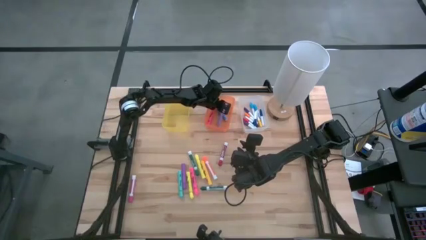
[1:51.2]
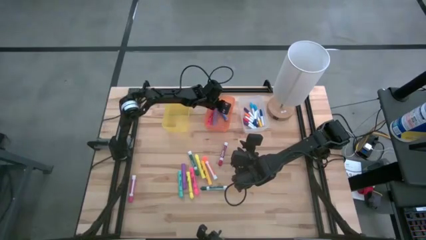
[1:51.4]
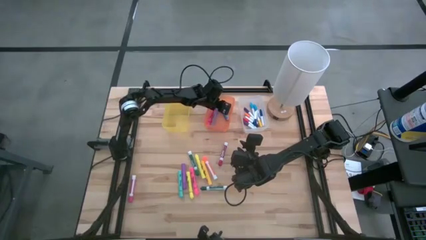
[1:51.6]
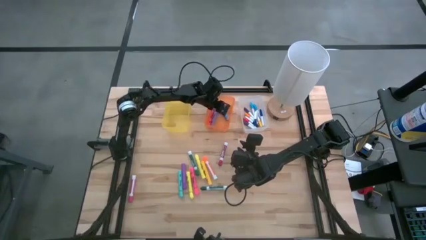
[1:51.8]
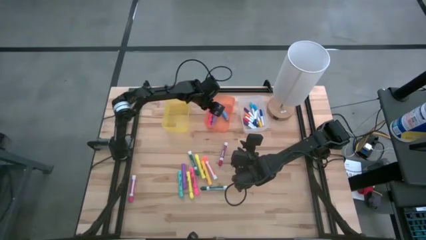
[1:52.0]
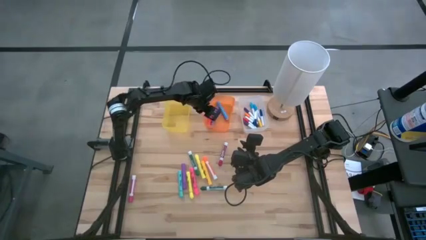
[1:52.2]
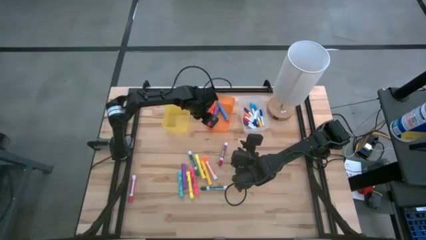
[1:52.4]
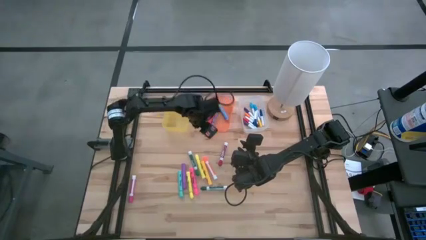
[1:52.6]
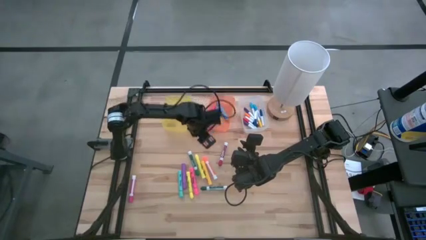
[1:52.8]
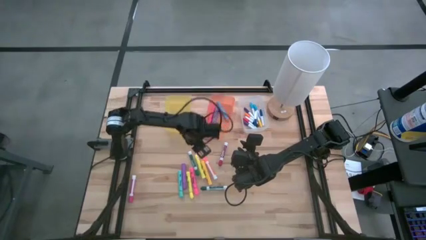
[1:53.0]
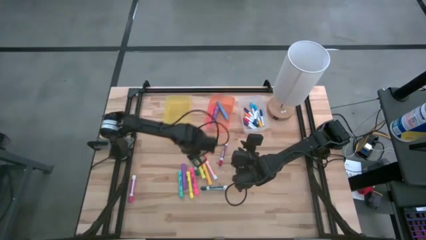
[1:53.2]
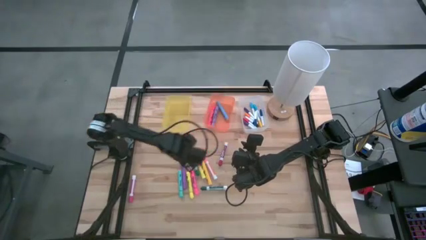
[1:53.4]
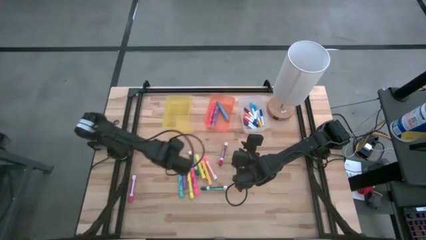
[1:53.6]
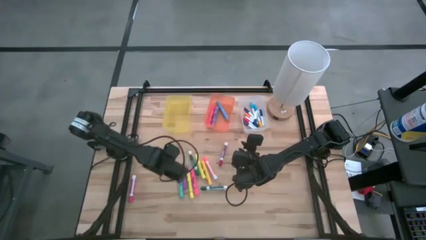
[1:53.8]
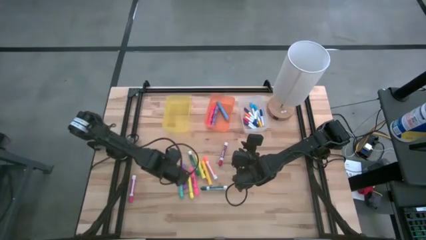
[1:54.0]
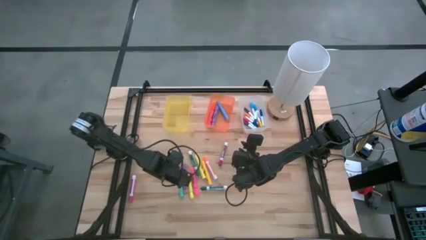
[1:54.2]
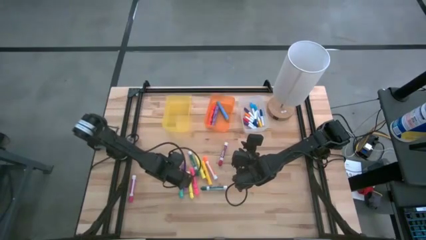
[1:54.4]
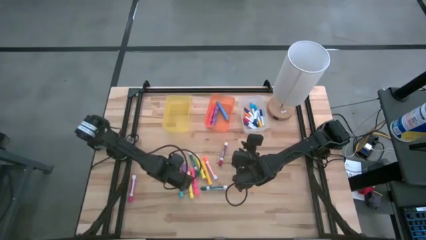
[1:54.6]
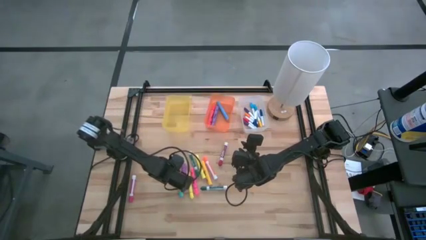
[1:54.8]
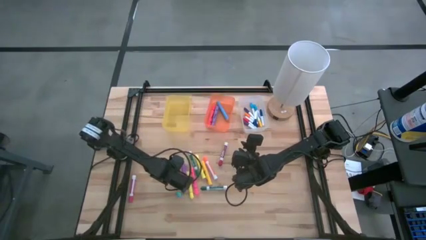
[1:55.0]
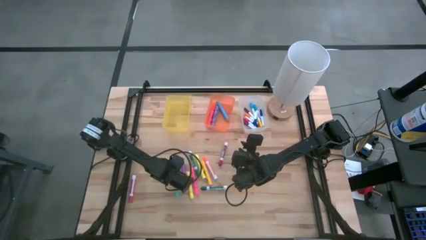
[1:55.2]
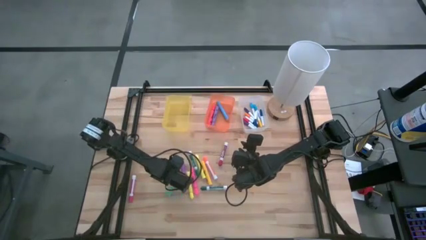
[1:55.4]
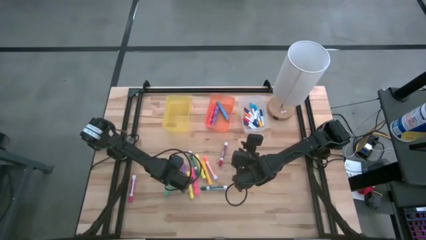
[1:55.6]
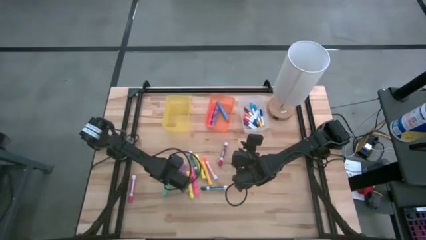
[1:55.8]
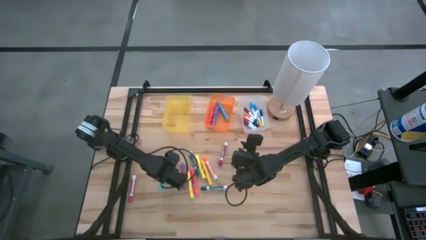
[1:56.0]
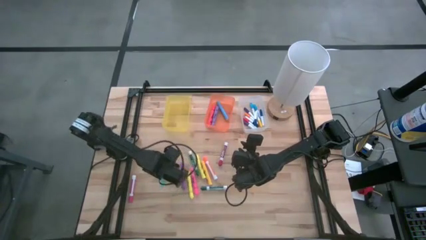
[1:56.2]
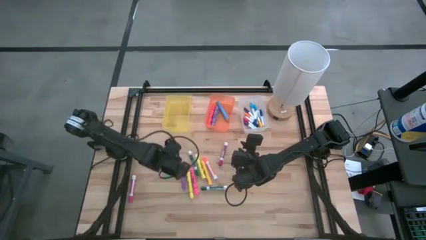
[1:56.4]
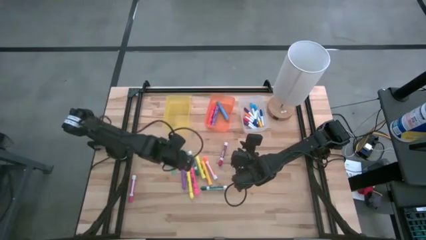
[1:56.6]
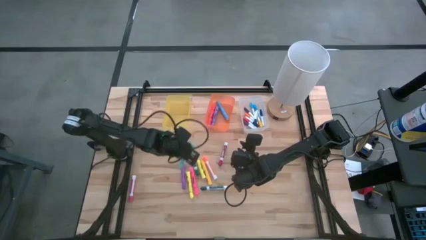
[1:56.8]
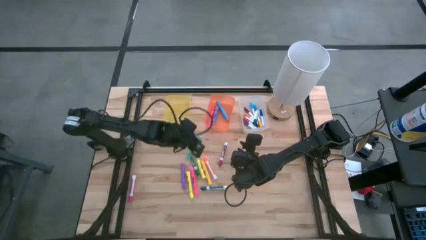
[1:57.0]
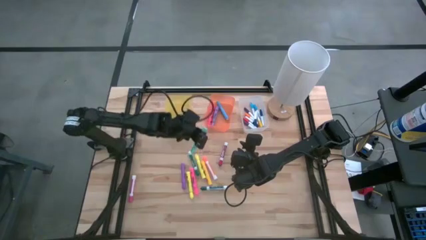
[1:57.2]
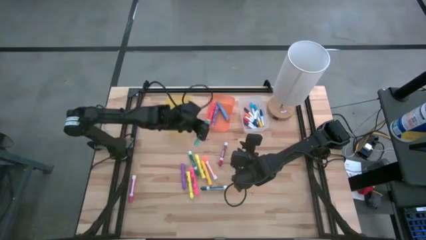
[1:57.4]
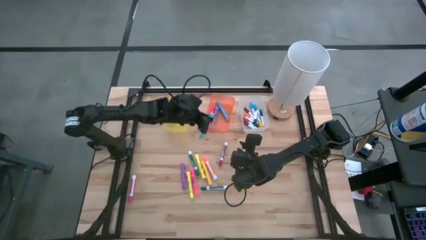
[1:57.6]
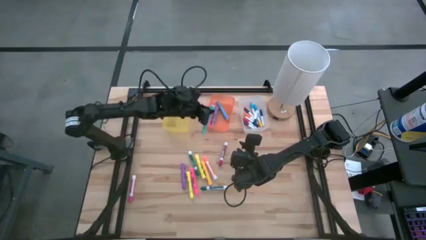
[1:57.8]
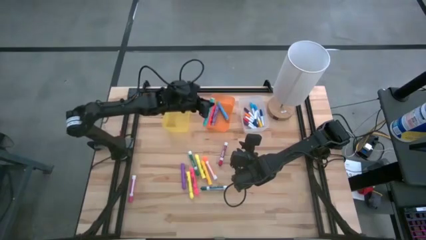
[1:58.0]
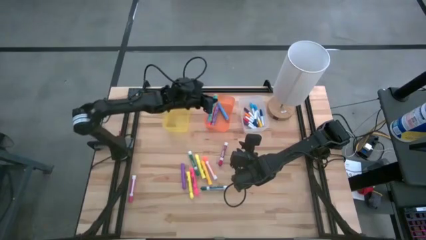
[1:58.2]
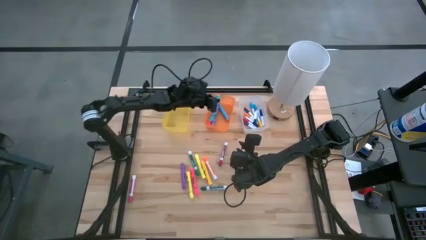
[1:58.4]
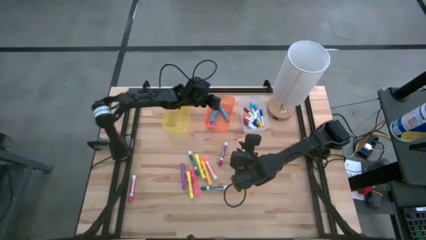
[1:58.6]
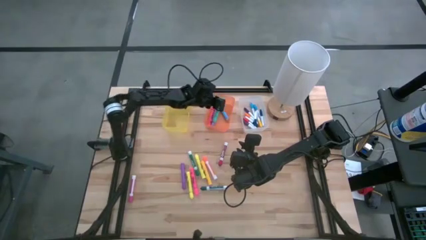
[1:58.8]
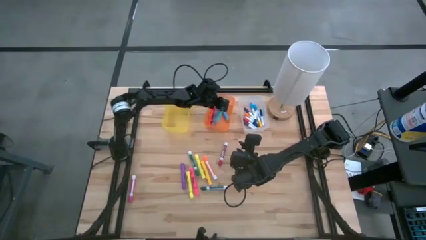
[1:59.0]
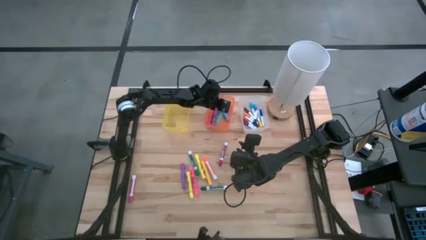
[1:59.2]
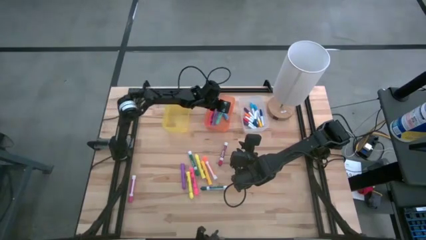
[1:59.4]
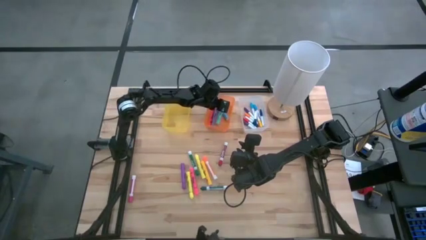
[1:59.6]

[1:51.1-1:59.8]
Task: Pick & Place Markers
Put the light blue highlighter into the orange bin

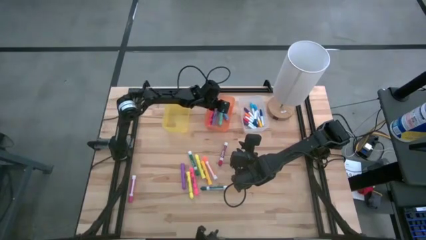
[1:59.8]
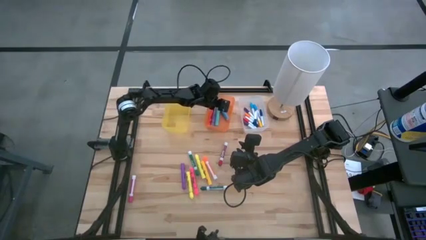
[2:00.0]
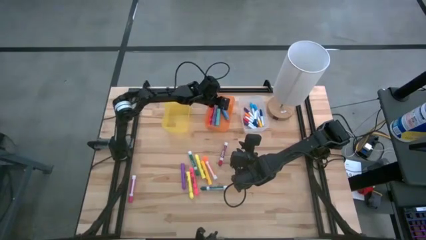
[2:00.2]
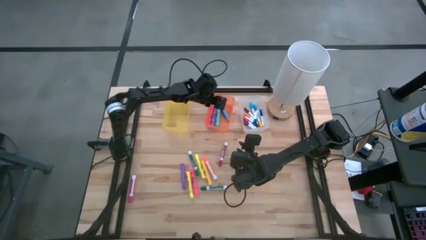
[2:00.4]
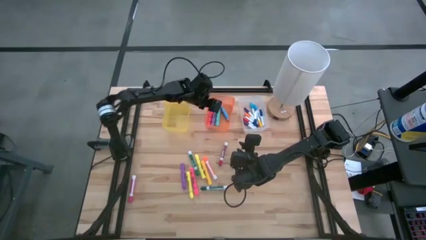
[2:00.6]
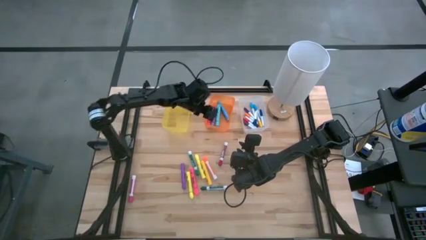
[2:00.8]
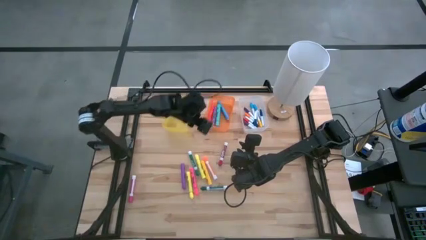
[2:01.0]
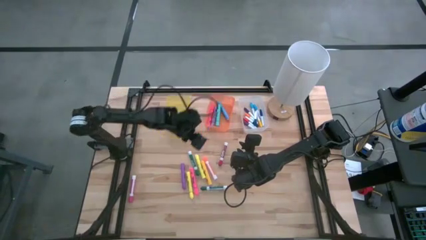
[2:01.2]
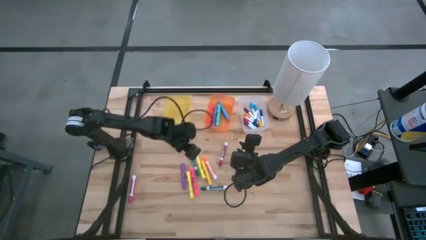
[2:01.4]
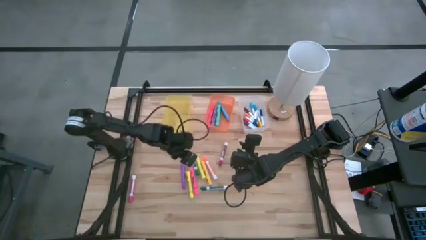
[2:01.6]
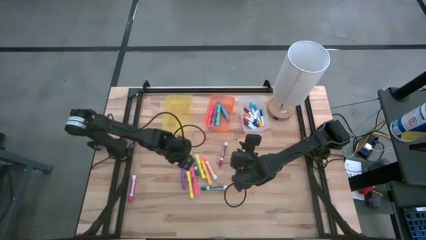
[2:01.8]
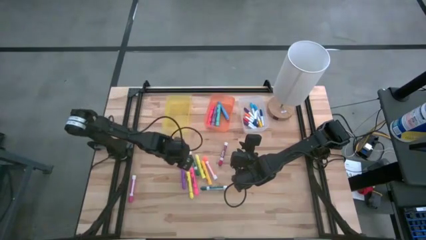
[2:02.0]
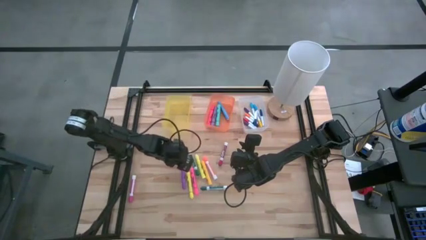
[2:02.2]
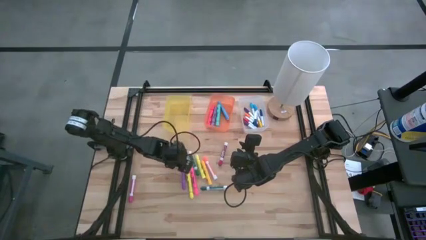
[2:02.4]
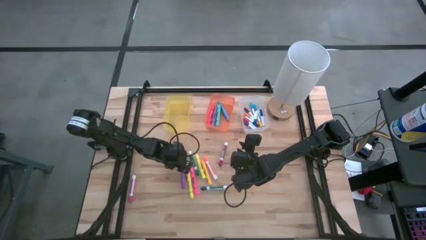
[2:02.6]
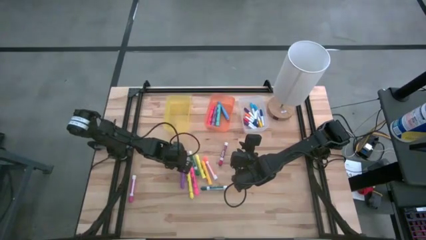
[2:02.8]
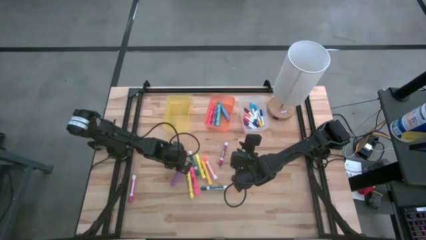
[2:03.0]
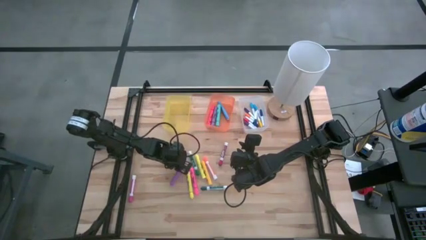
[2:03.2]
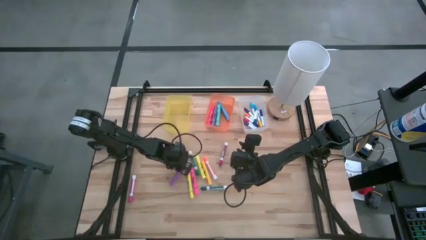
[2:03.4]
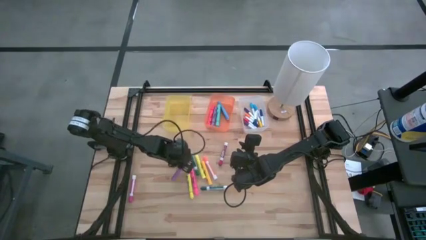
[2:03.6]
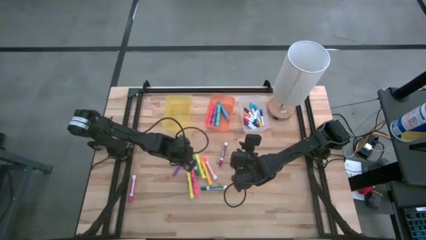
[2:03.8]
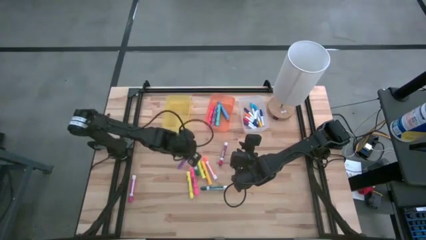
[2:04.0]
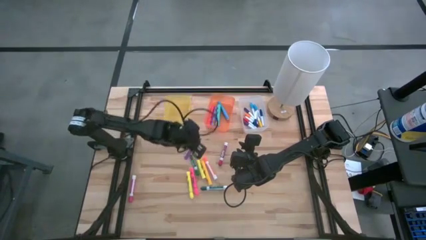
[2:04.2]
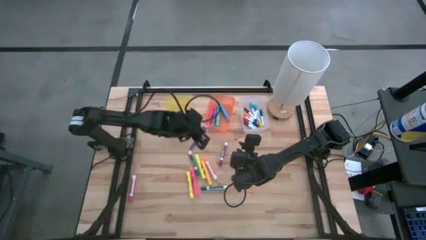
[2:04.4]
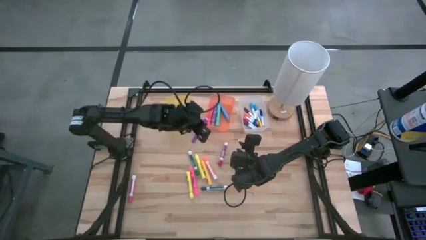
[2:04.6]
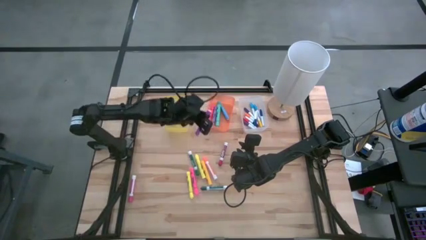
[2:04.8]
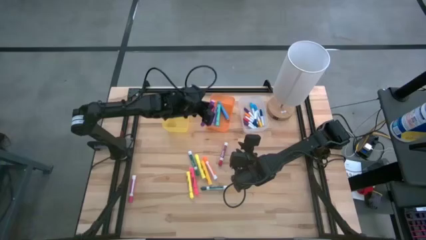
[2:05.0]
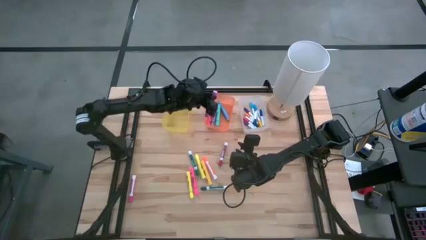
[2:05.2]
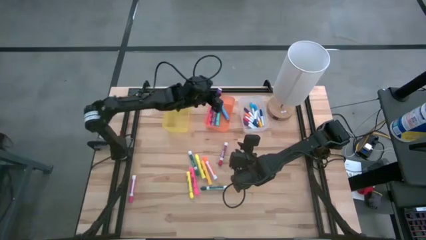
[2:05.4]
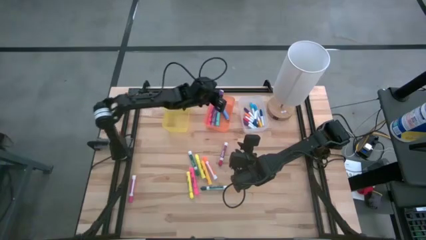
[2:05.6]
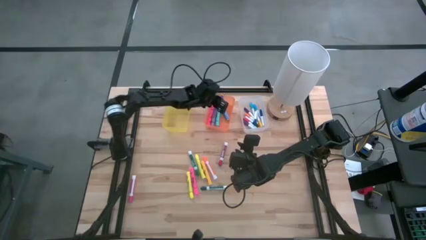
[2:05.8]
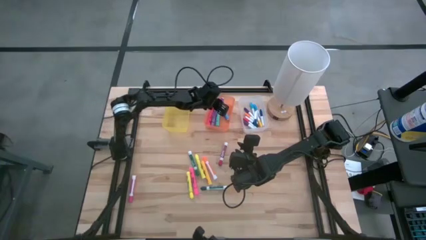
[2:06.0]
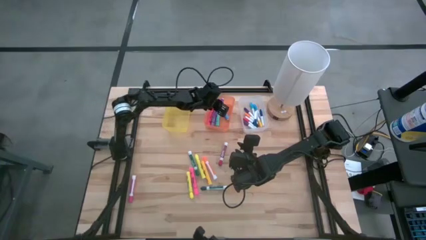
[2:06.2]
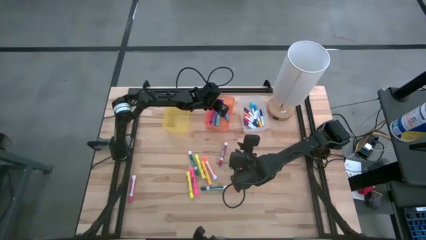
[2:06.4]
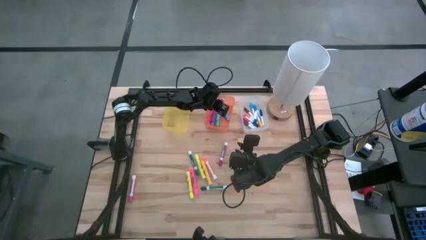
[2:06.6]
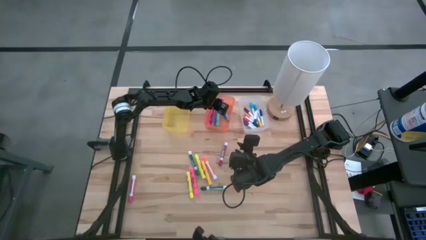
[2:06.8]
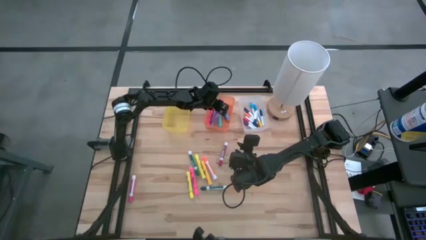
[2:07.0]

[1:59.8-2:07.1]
Put the purple highlighter into the orange bin

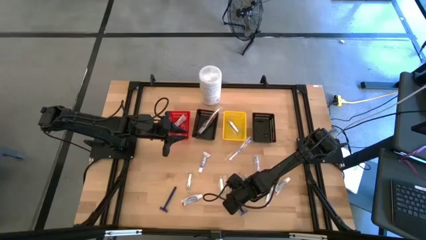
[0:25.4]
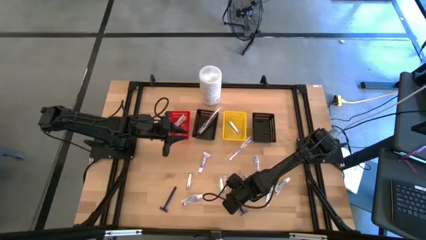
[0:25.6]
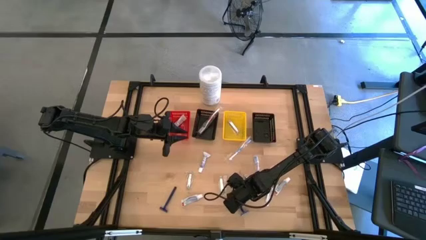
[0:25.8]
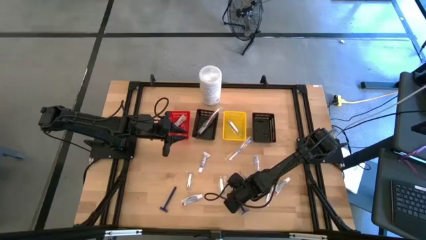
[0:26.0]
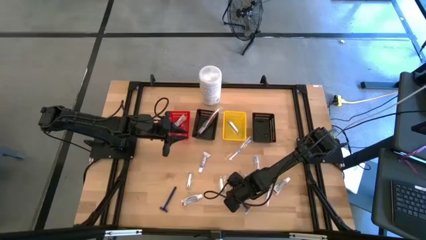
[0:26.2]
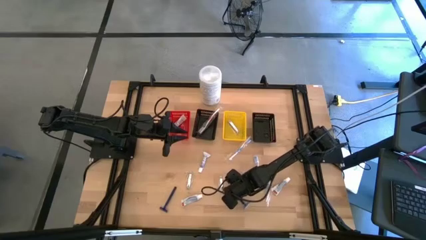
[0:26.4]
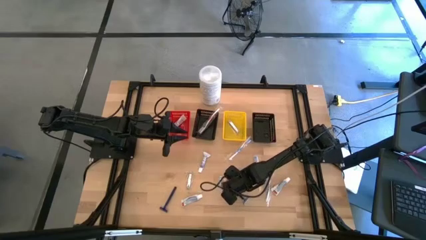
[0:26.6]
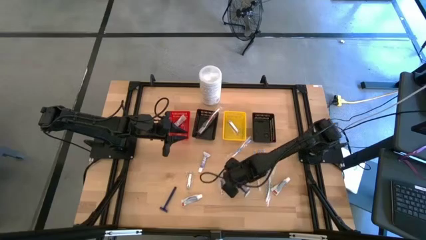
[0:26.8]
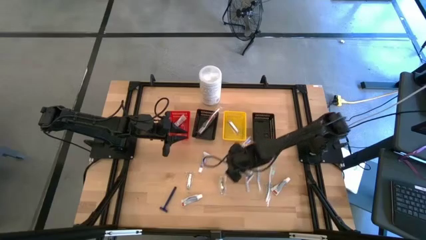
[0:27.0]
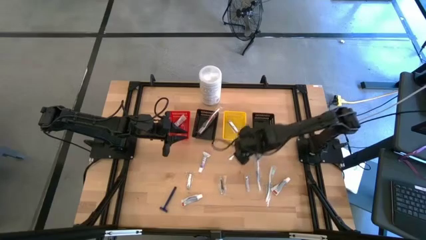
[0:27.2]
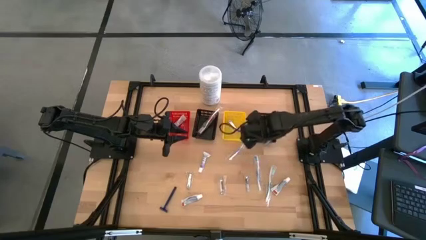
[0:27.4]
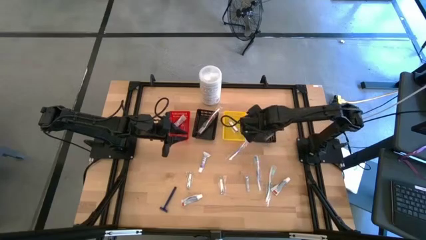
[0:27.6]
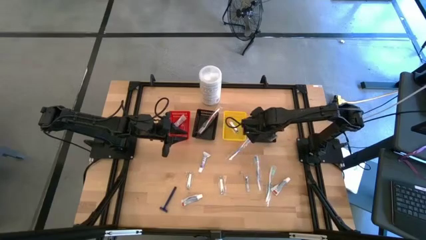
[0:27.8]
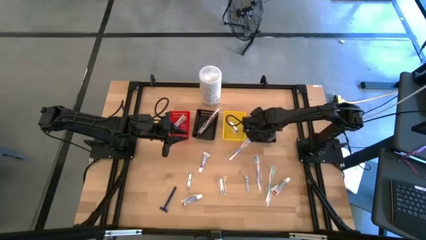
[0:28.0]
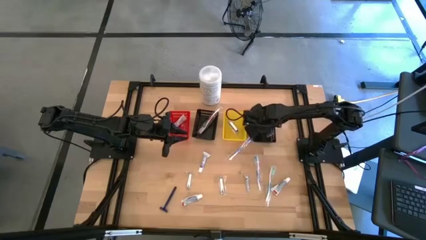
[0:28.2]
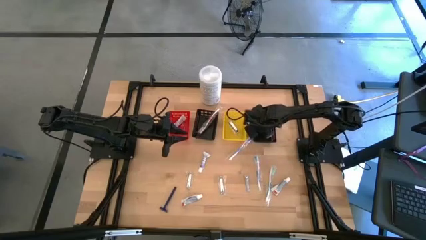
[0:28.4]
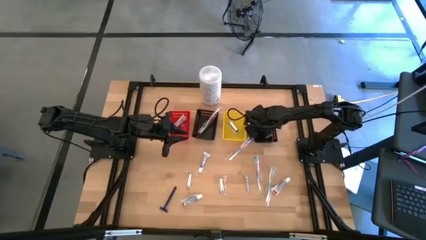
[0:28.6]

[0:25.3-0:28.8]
Task: Pick & Place Travel size toiletries
Put the razor into the right black basket
